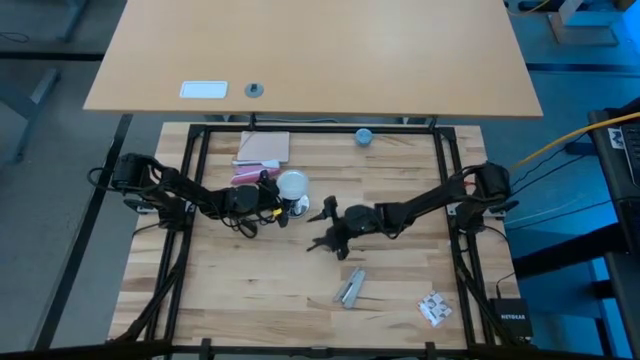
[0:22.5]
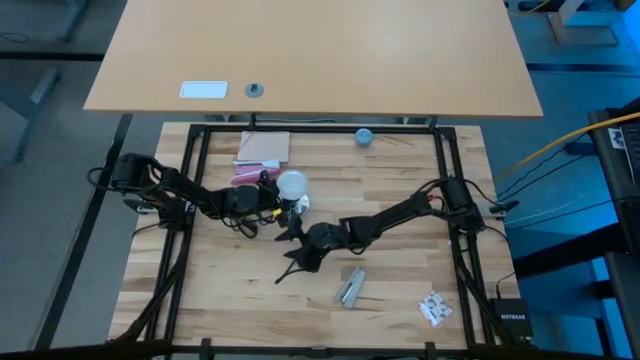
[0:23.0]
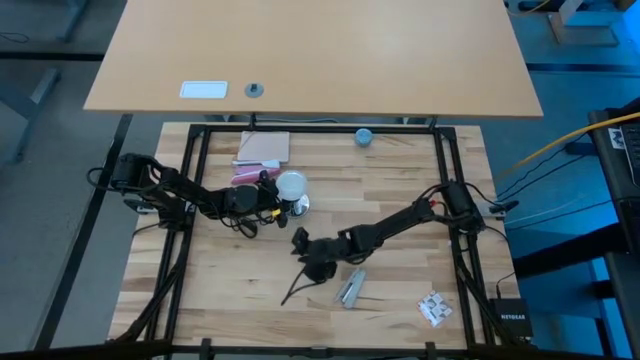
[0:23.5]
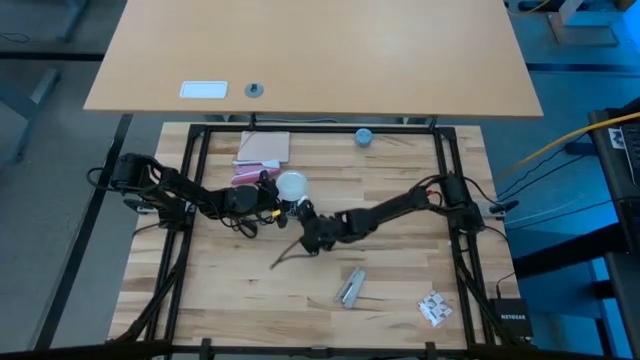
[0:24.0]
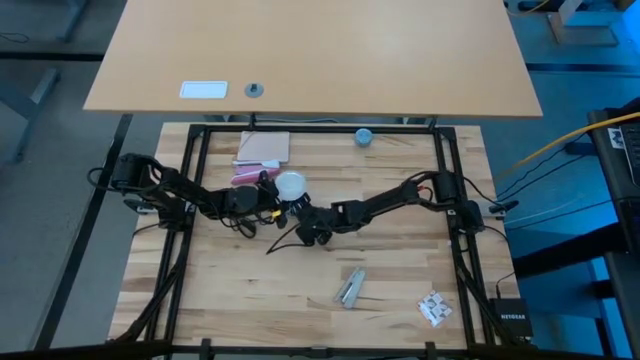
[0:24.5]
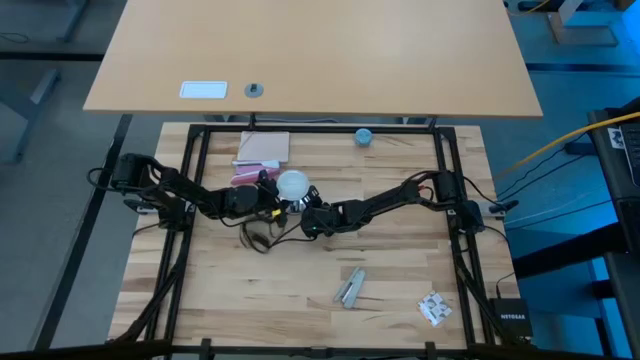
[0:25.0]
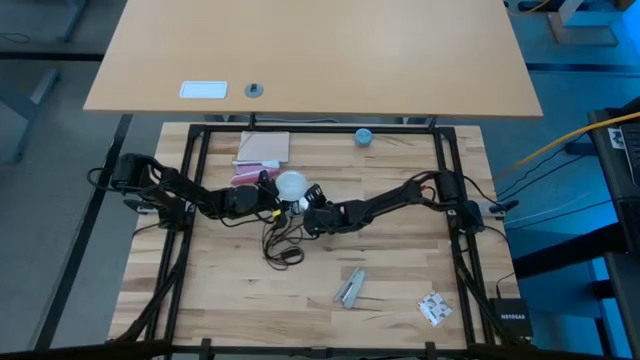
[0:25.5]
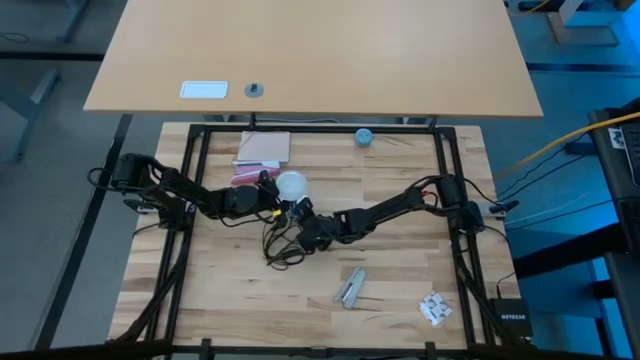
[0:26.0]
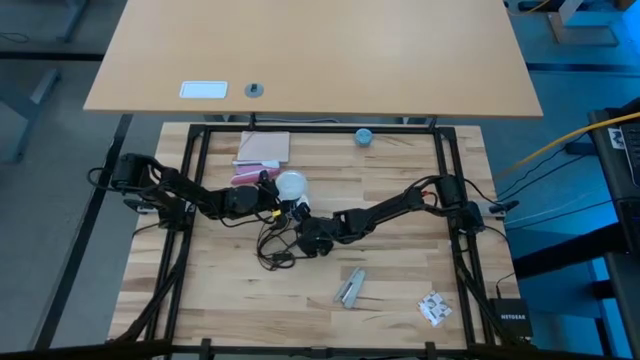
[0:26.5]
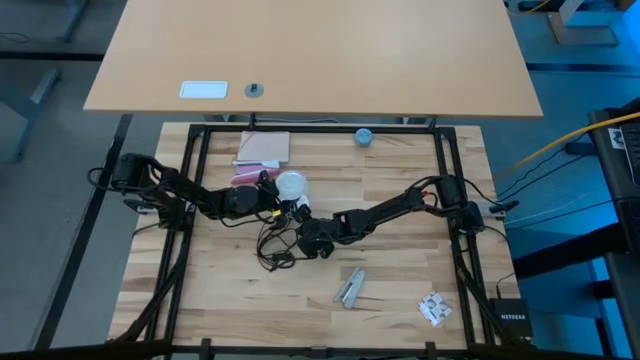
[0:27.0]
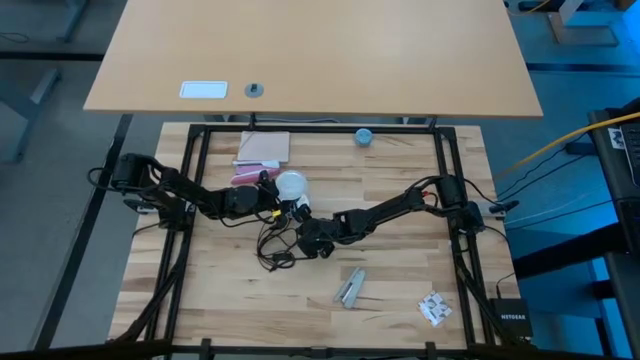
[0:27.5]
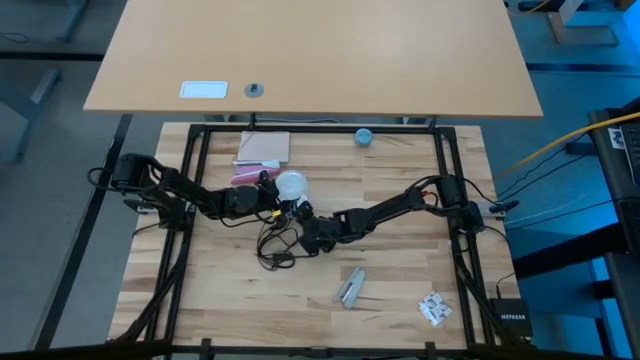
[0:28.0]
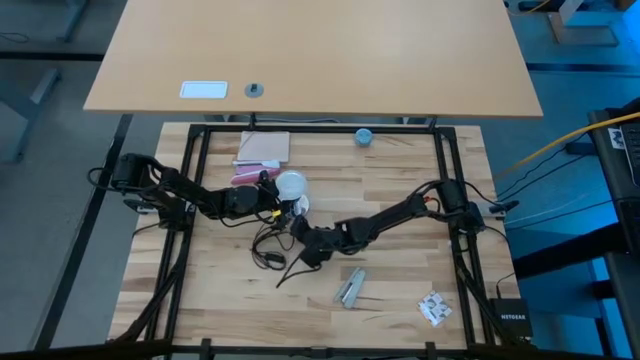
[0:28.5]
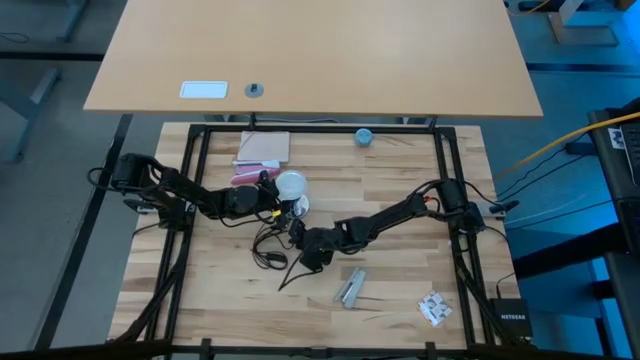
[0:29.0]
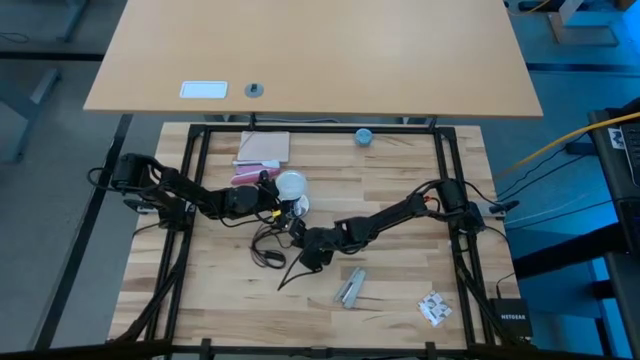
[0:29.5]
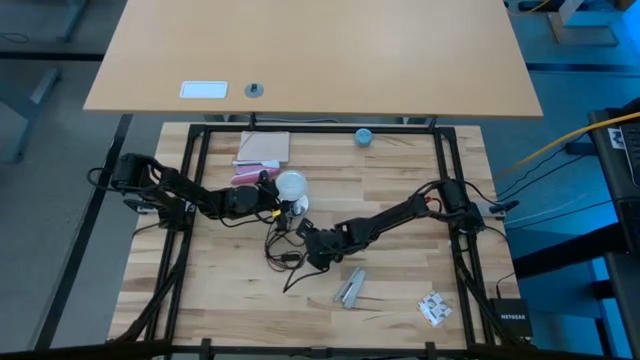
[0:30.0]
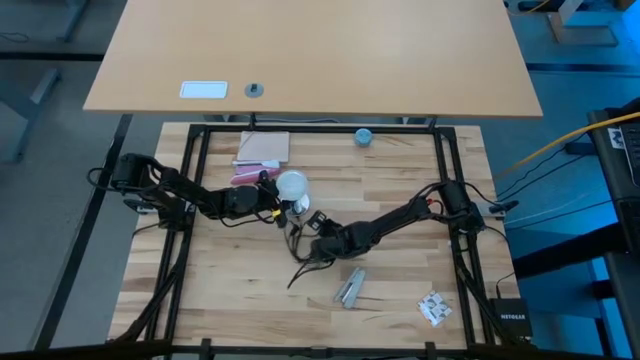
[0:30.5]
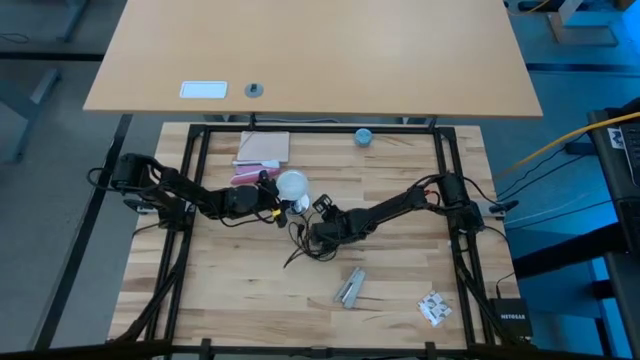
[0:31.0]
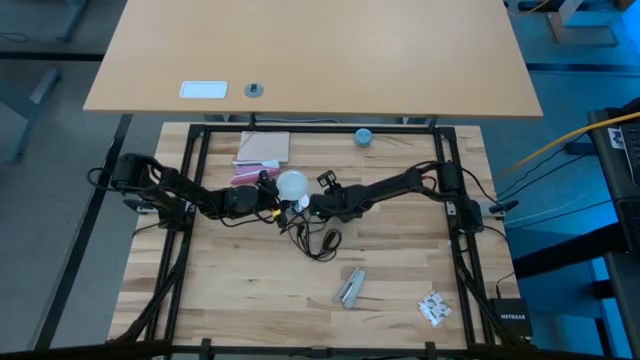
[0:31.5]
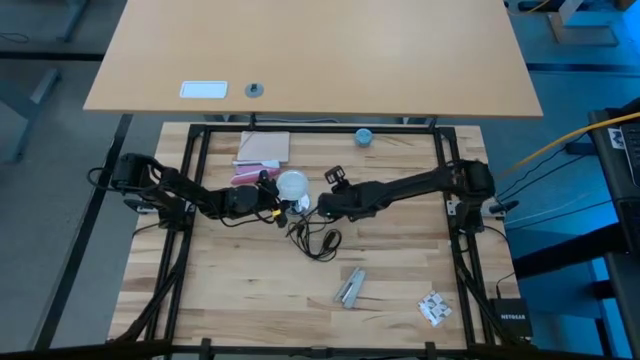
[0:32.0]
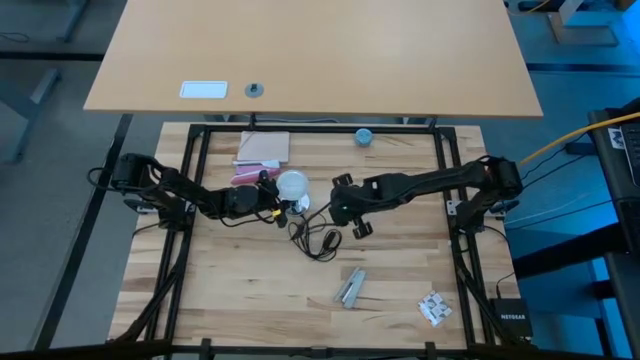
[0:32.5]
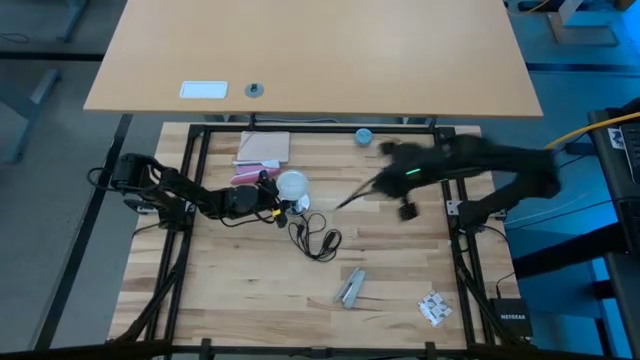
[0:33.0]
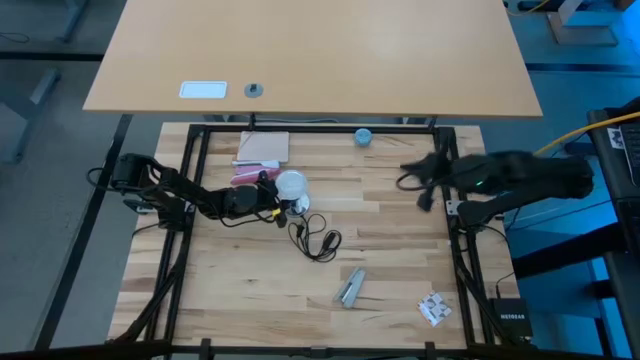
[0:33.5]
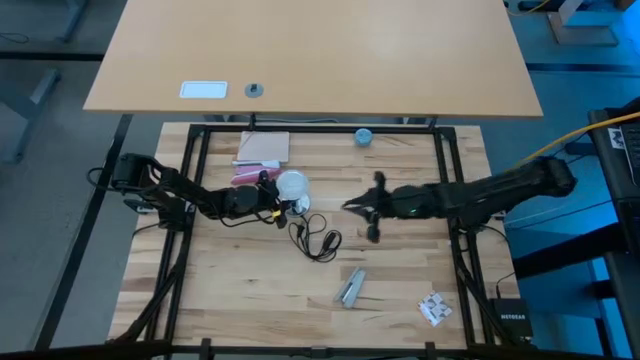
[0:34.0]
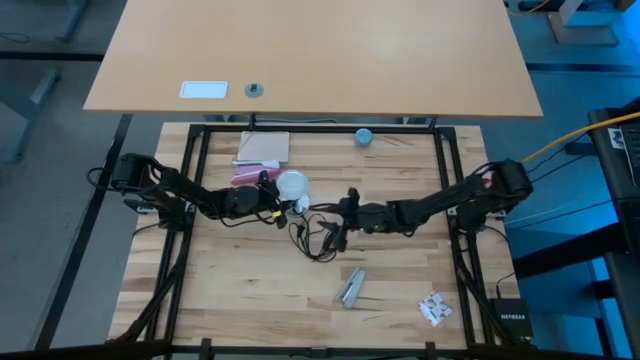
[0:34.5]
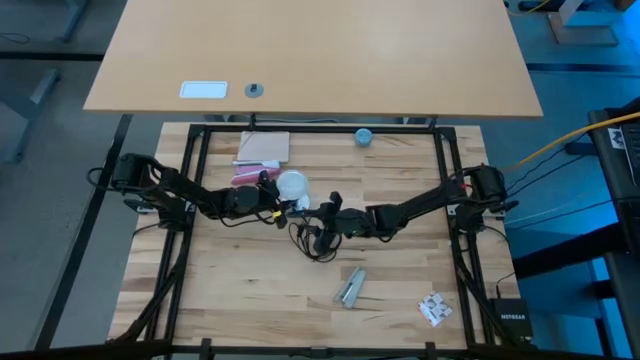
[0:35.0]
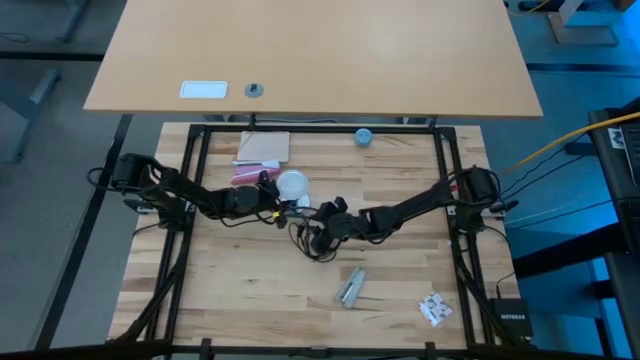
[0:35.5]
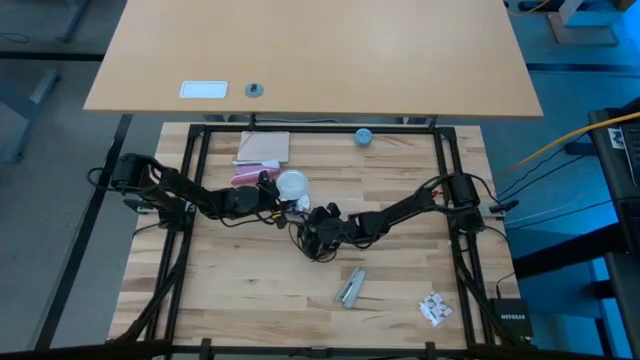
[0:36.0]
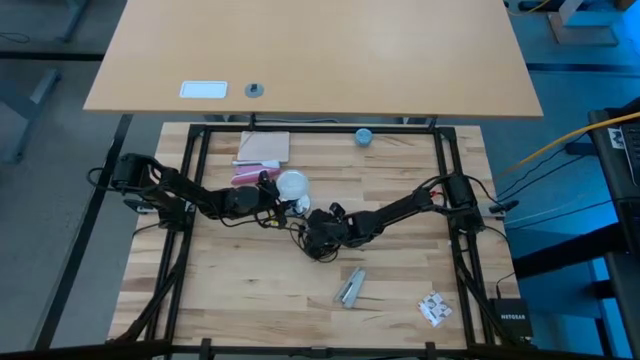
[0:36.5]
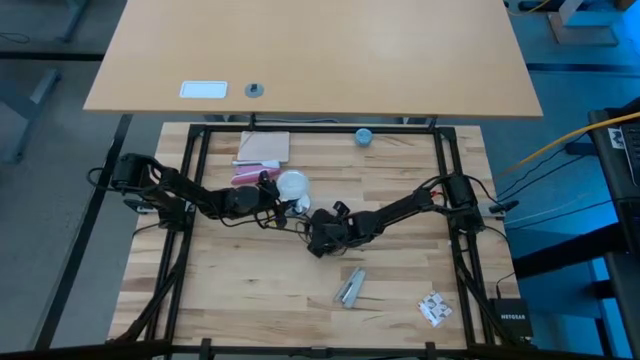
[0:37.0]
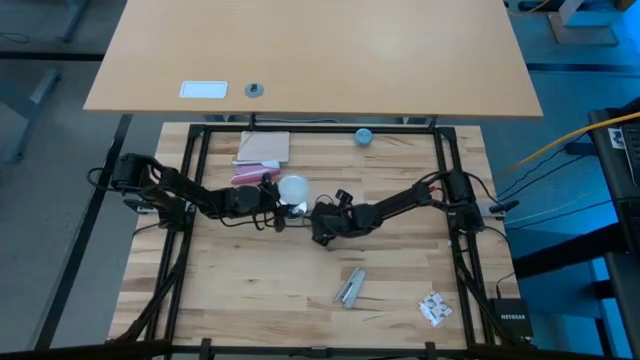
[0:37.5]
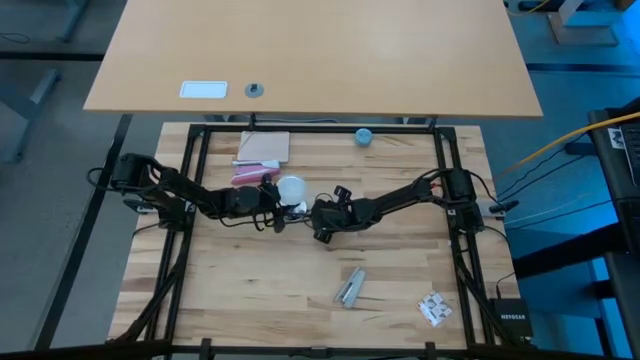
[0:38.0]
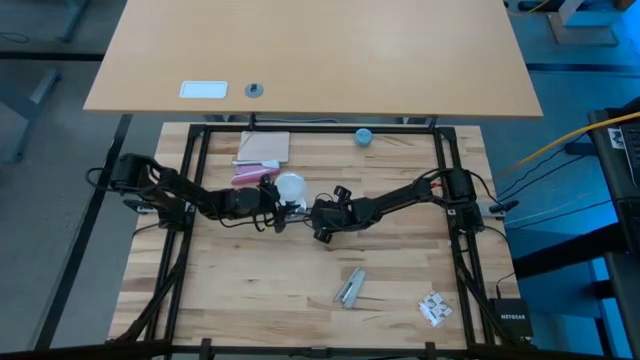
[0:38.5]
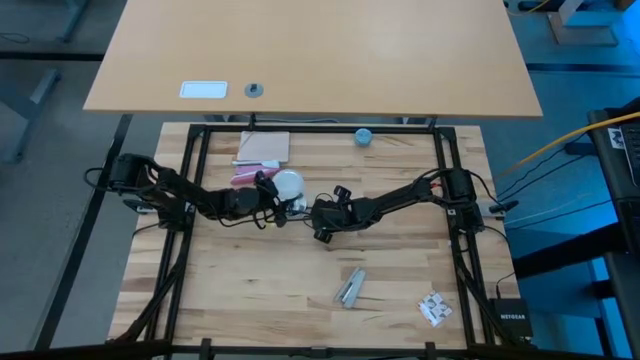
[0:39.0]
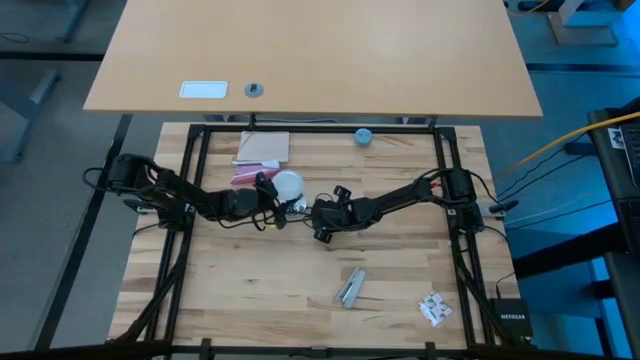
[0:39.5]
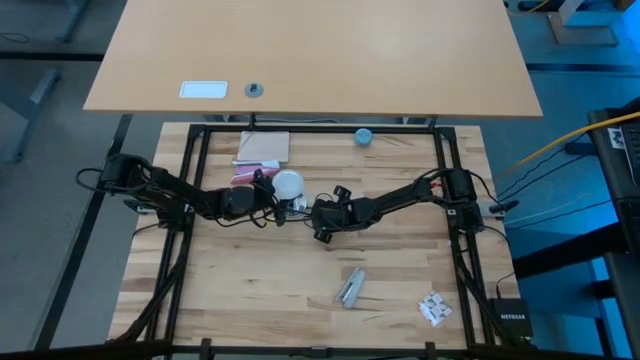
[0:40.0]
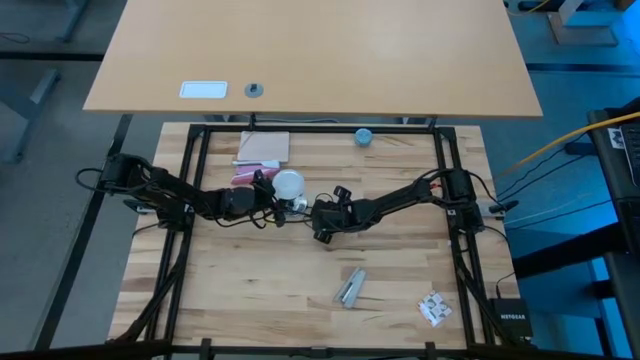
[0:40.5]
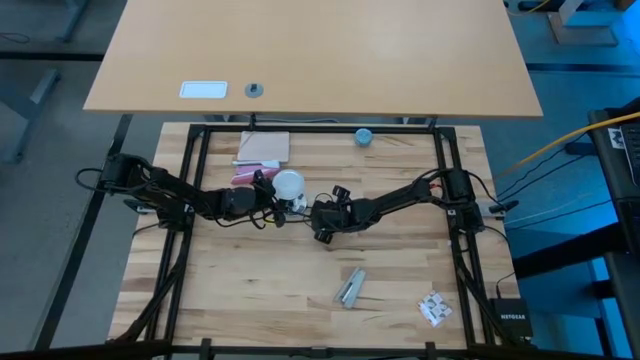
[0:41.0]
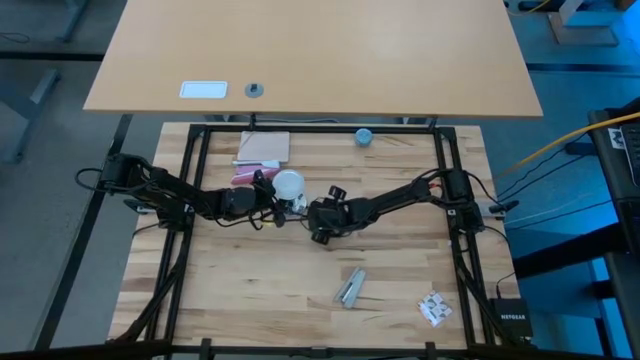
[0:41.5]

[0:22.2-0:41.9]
Task: Screw lightbulb
Insert the lightbulb into the lamp

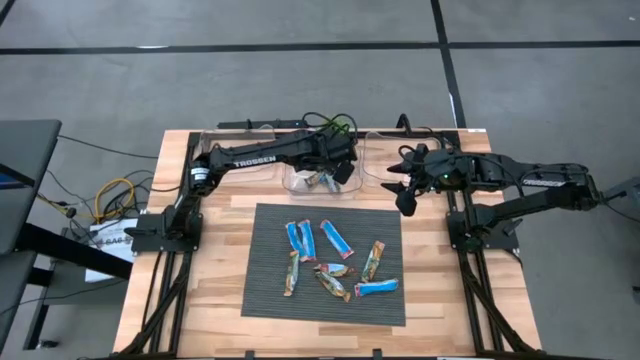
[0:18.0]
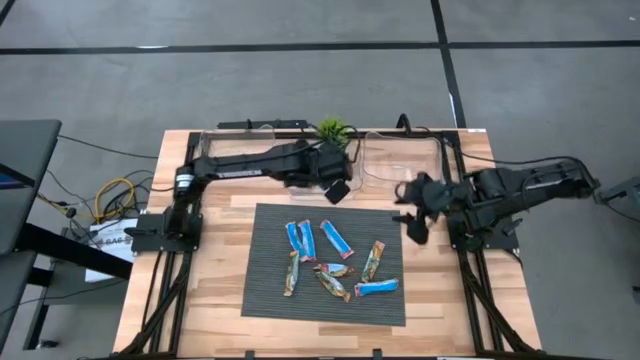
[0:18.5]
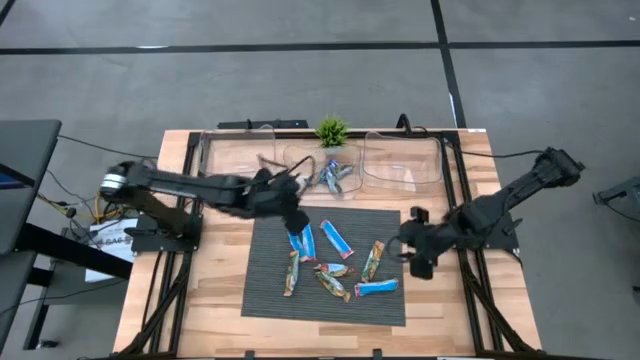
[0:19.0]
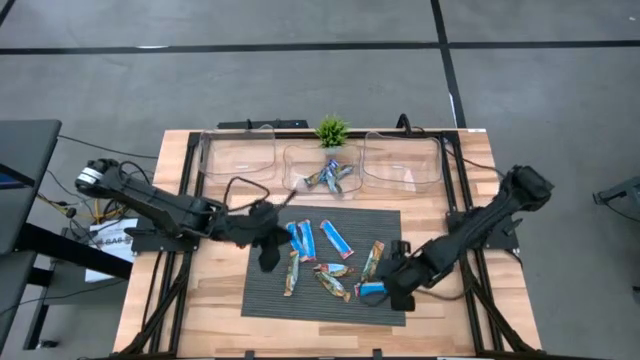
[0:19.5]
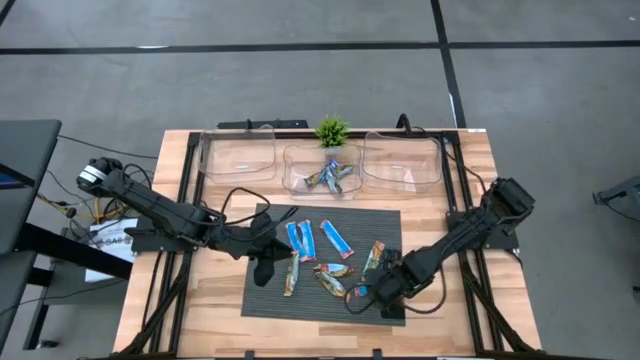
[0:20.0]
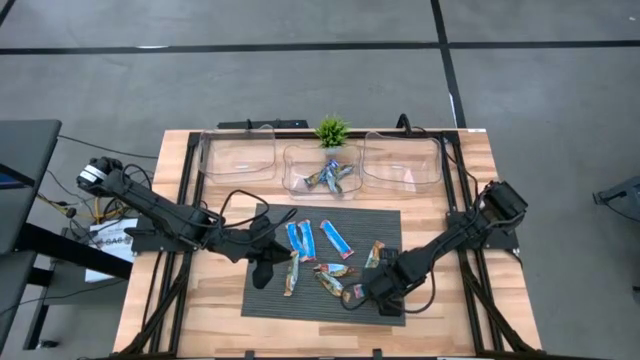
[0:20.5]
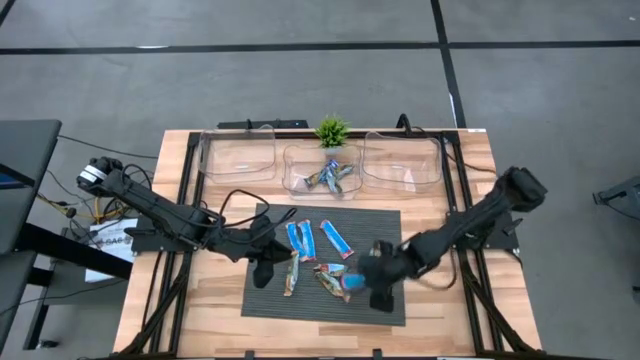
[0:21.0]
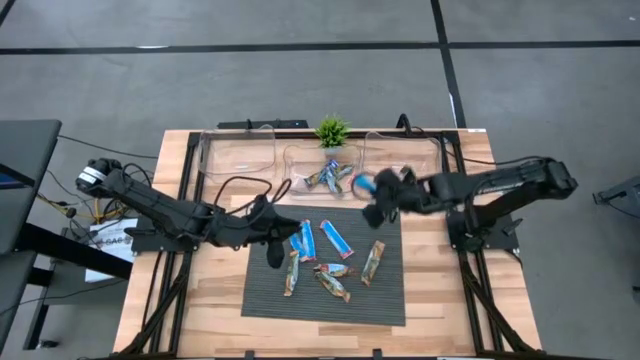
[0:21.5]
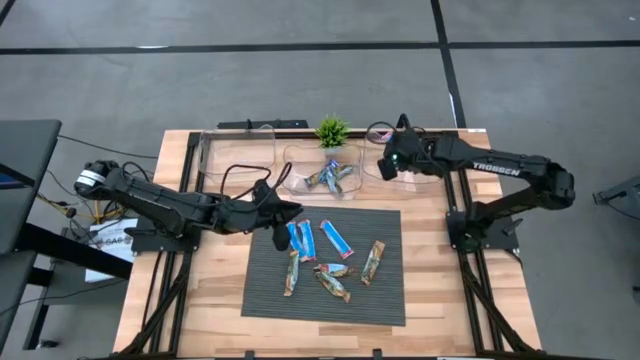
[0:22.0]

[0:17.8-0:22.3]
Task: Pick and place Granola Bars by type
Put the red granola bar into the right transparent bin
